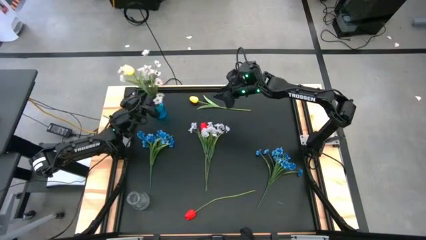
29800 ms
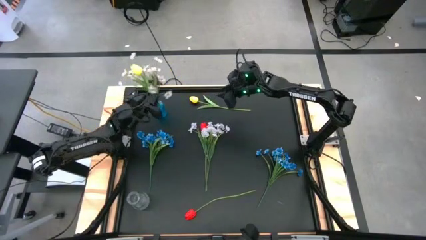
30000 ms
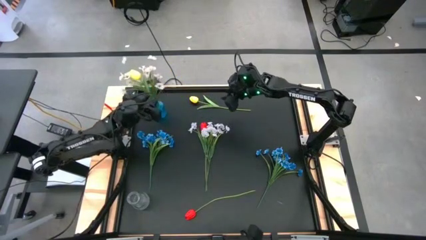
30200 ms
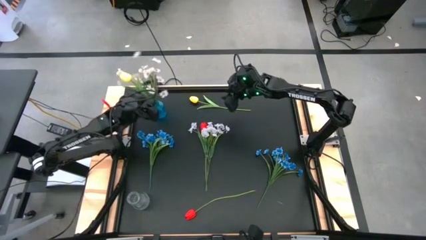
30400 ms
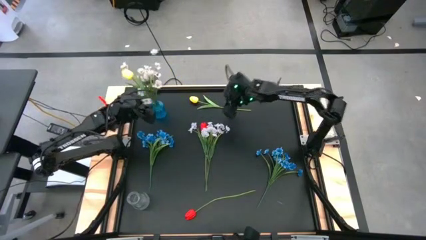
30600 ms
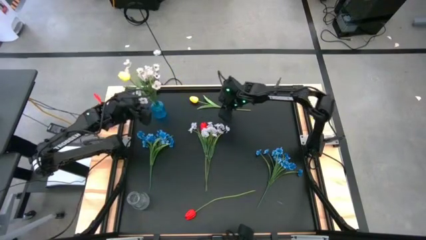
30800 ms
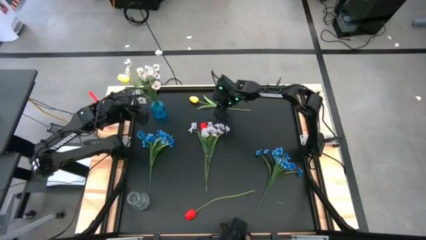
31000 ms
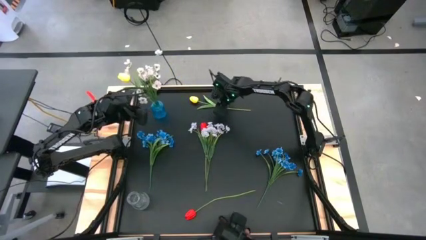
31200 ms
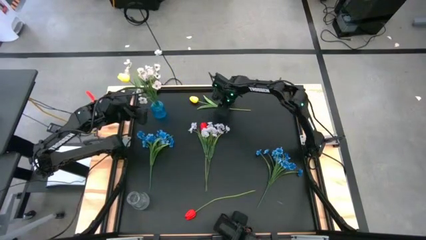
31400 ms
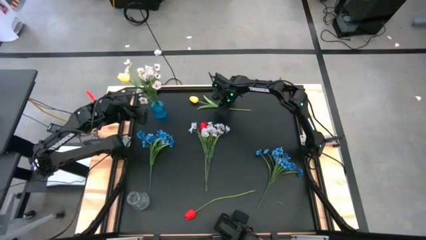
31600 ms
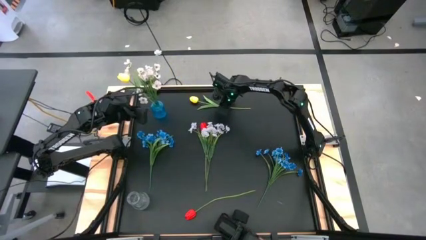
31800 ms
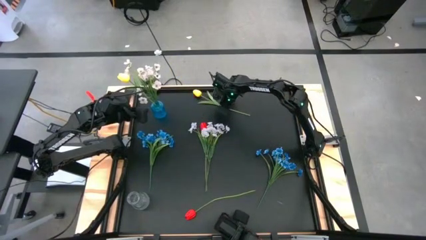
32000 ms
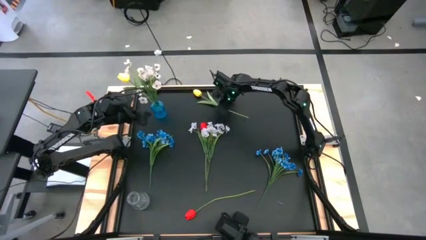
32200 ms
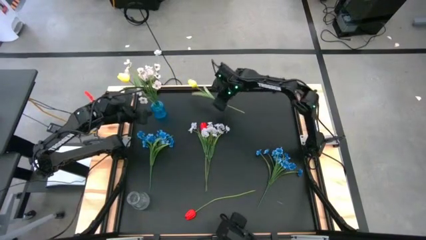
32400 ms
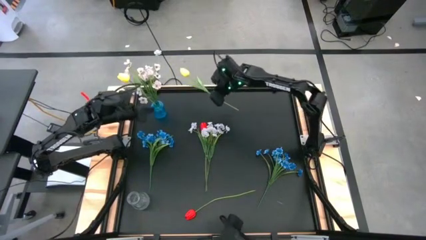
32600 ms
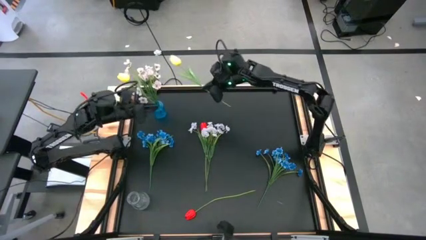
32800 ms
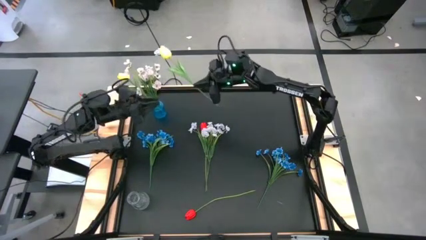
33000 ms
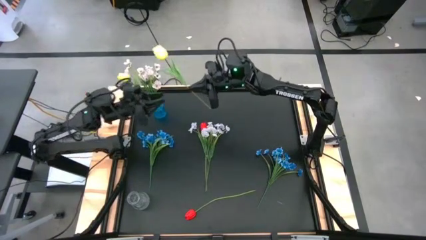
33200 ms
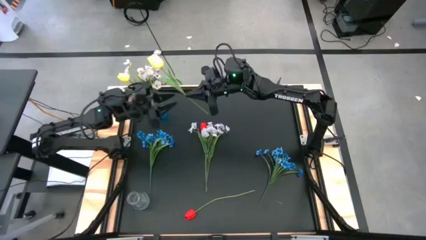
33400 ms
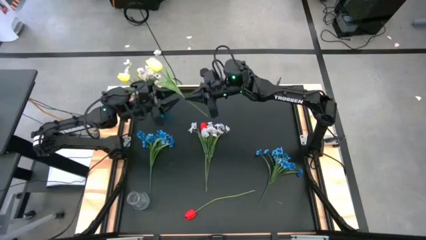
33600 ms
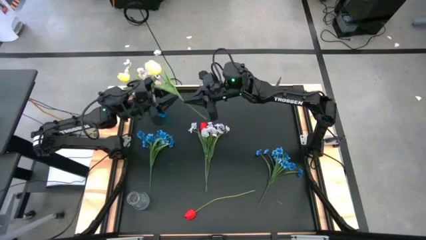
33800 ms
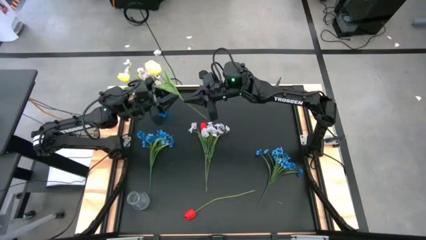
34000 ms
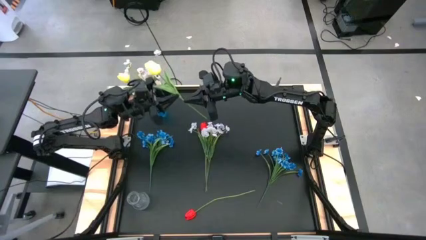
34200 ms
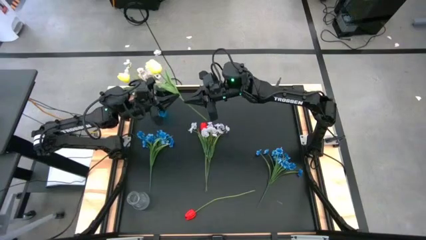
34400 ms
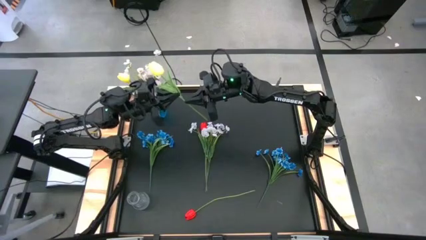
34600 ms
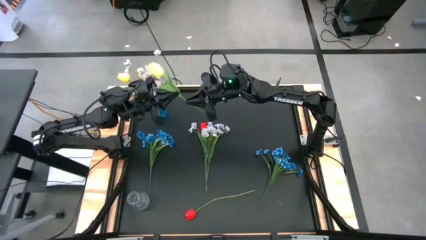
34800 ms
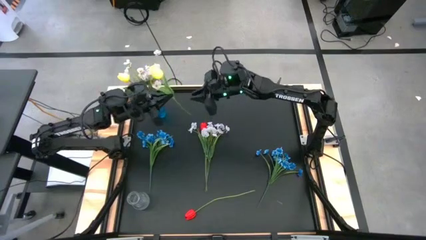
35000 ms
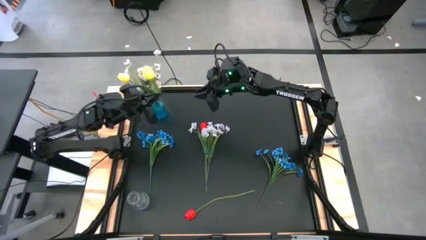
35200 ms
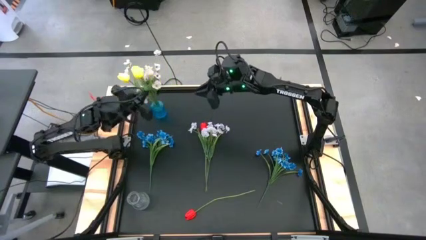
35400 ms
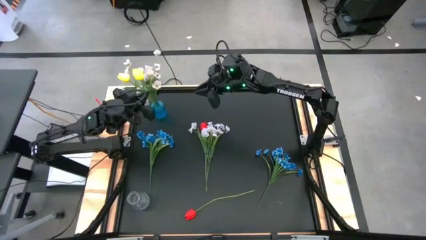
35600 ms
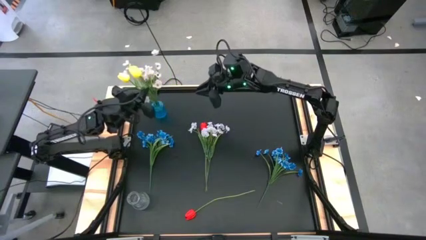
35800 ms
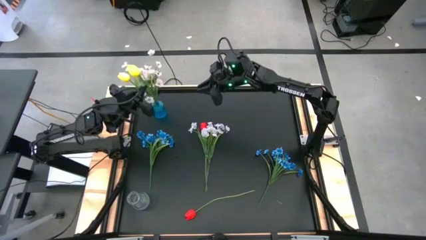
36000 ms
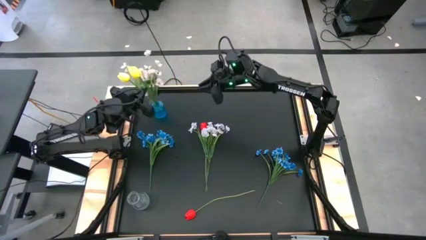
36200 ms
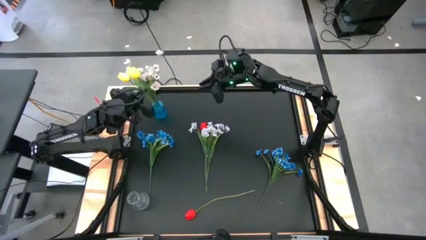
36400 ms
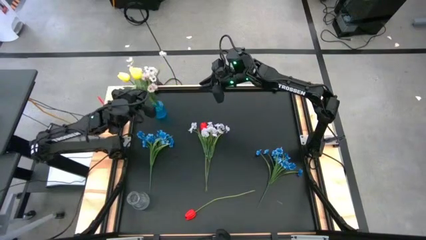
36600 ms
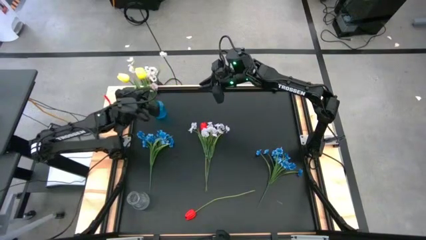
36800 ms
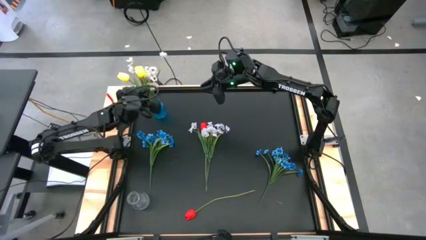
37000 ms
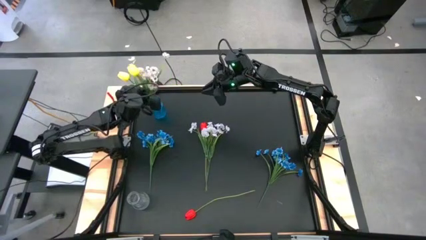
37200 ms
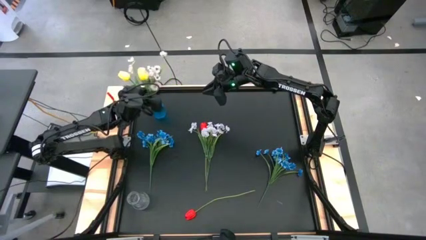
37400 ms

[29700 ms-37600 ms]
Task: Sort flowers into vase by color
Put the yellow flower into the blue vase

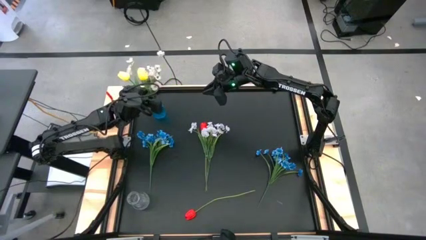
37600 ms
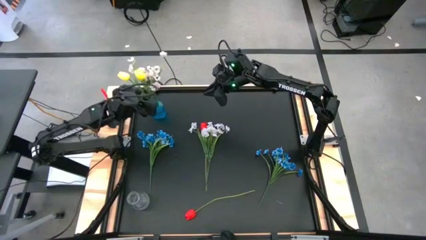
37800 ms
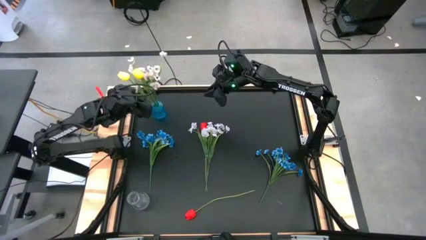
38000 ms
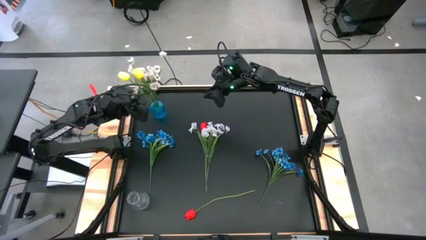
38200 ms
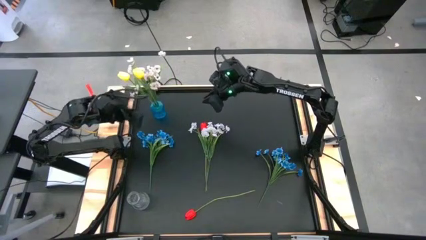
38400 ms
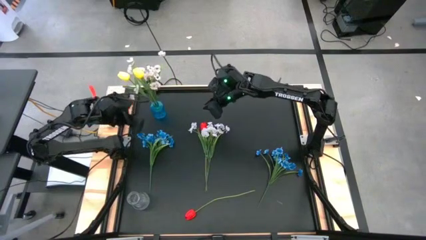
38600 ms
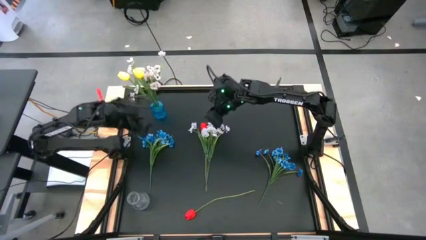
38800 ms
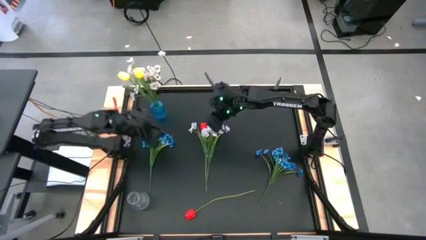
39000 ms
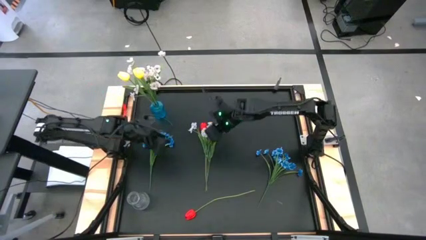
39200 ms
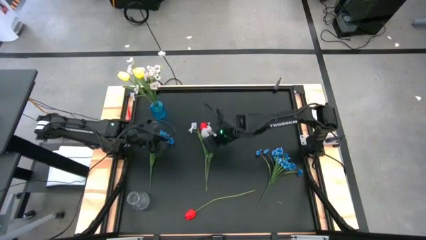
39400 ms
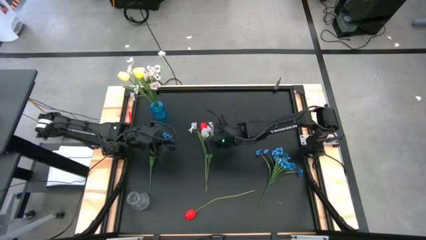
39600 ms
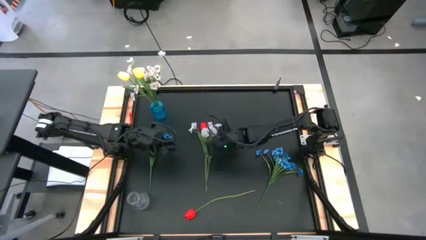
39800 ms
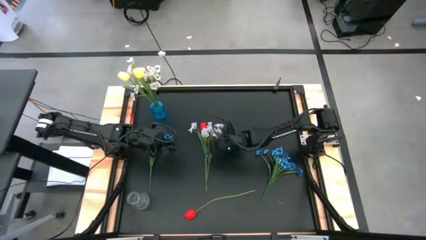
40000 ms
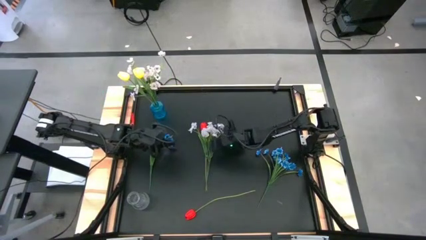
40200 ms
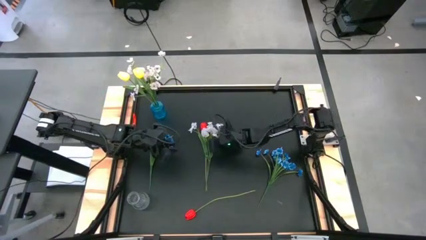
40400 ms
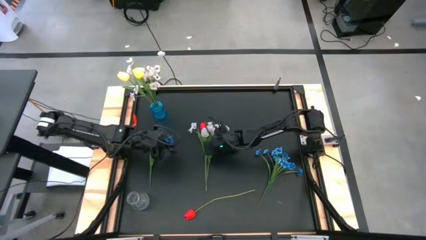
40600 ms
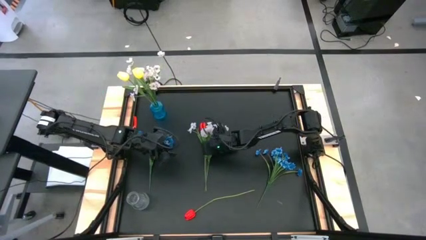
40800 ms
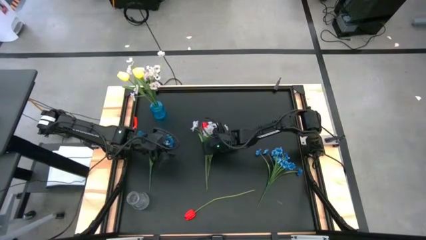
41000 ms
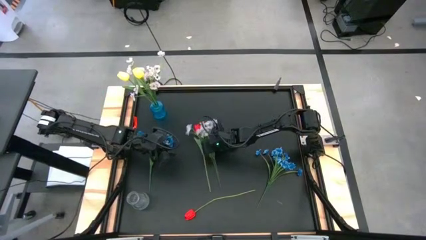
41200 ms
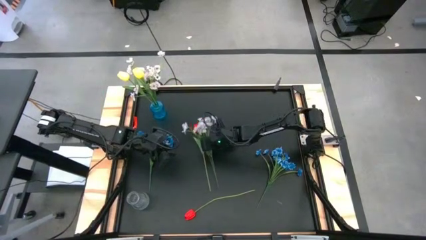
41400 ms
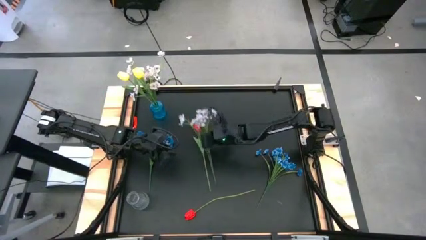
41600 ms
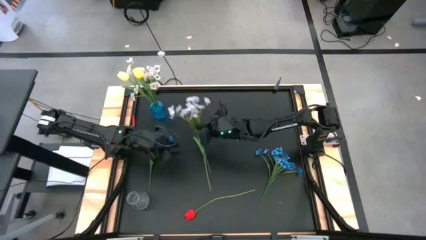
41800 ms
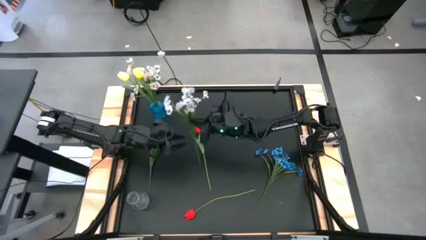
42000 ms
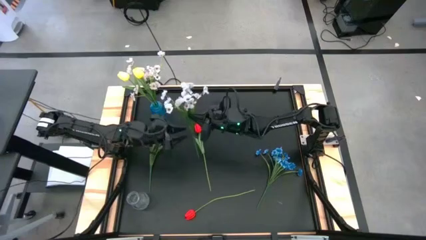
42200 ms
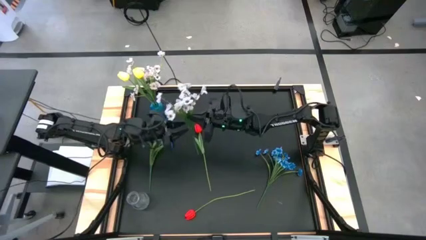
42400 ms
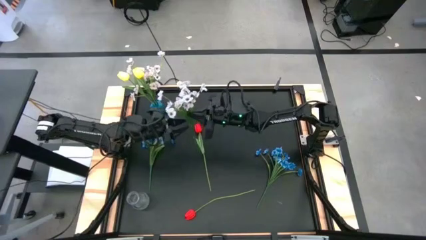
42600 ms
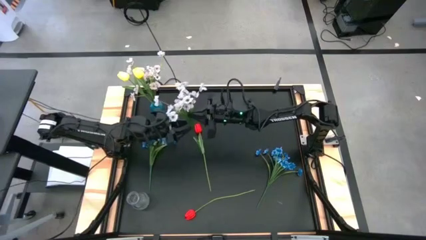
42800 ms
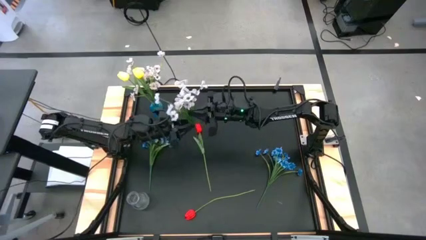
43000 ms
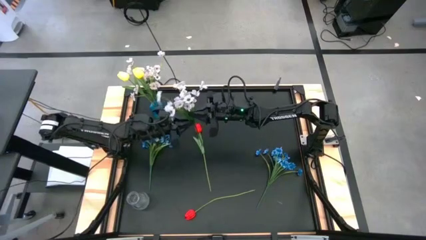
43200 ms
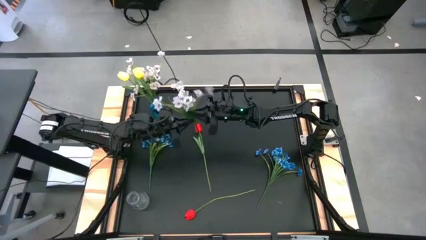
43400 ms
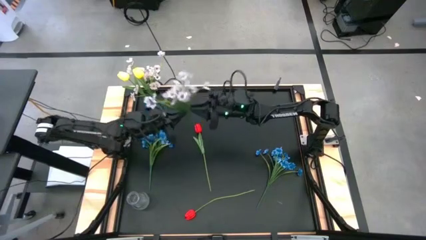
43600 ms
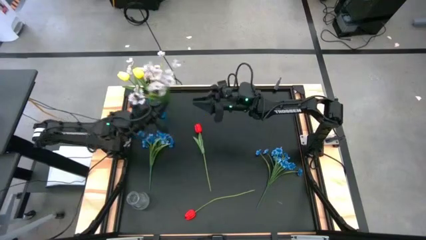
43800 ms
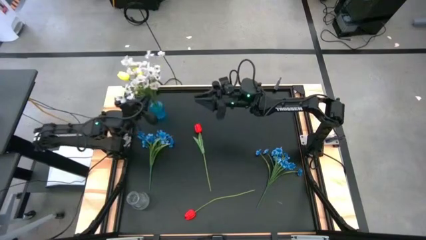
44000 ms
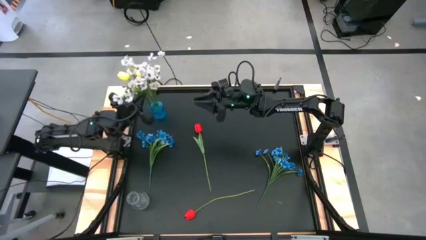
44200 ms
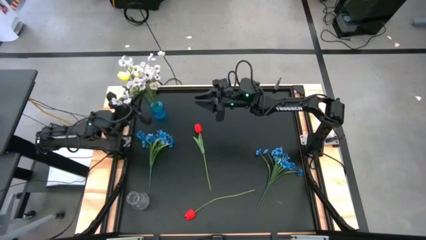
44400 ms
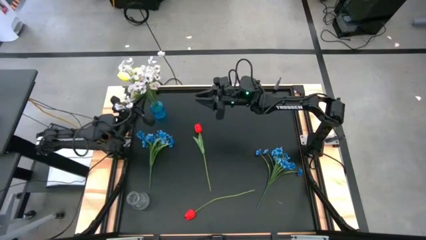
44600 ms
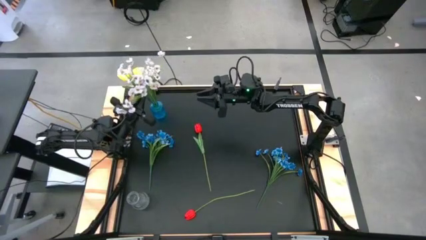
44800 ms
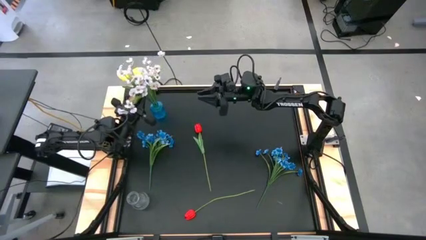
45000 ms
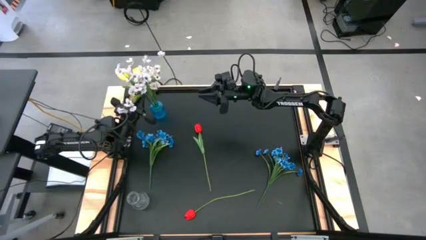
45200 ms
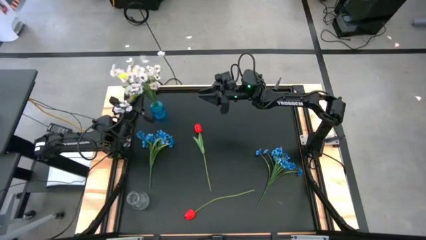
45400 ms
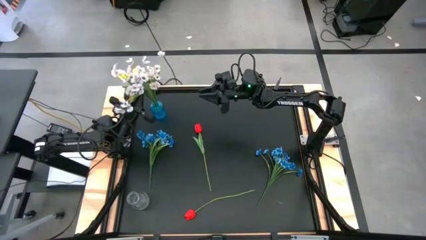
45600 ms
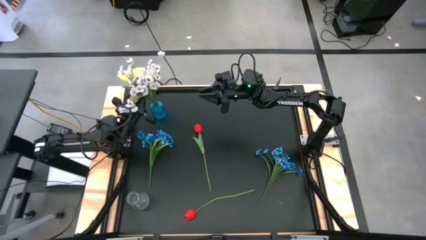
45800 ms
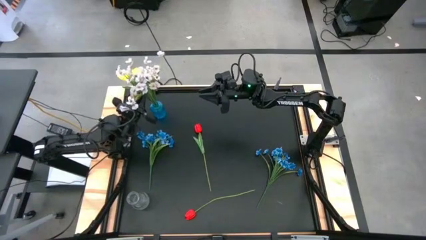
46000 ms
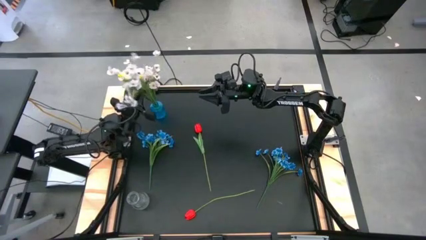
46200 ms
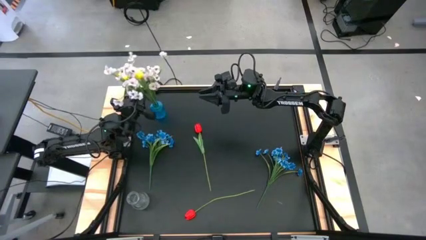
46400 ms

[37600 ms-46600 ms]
Put the white flowers into the blue vase
